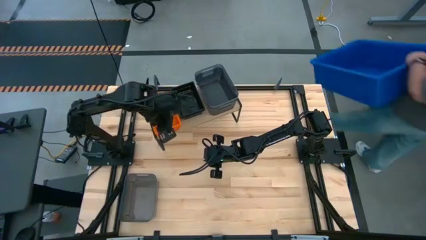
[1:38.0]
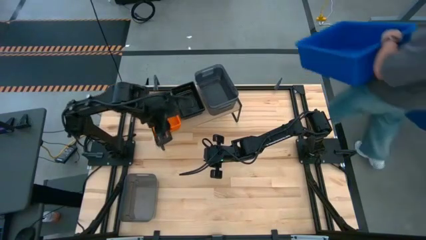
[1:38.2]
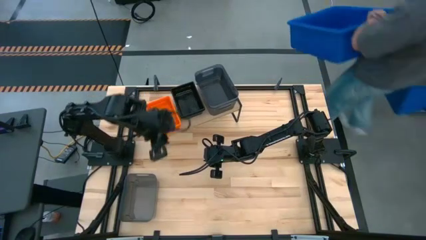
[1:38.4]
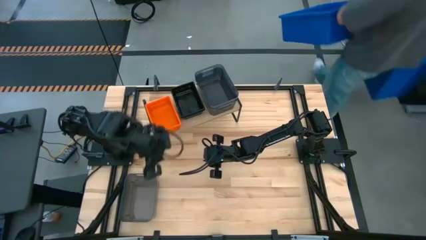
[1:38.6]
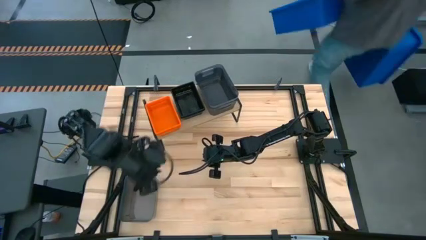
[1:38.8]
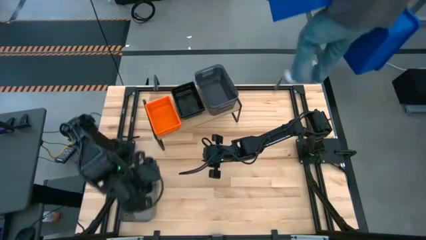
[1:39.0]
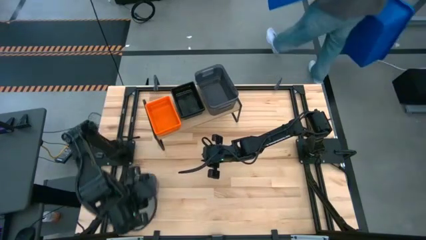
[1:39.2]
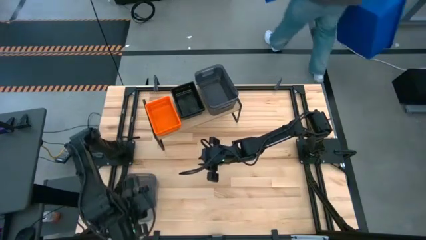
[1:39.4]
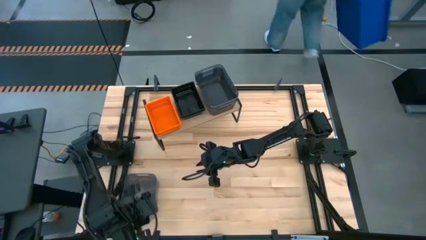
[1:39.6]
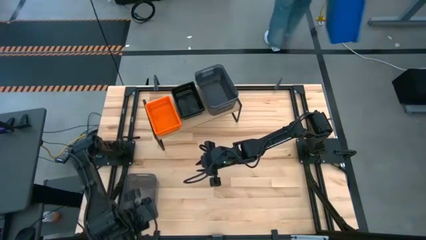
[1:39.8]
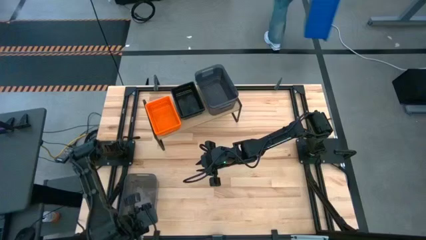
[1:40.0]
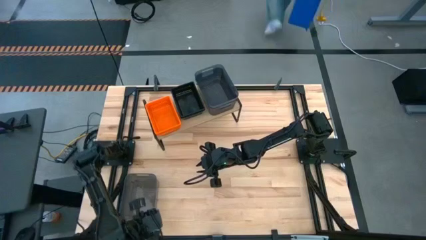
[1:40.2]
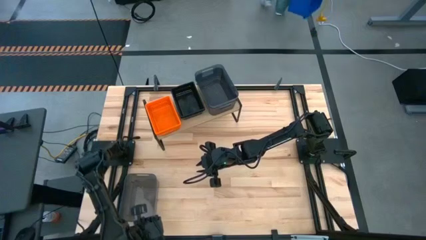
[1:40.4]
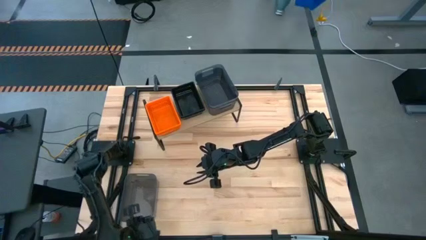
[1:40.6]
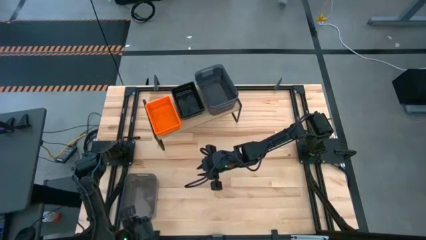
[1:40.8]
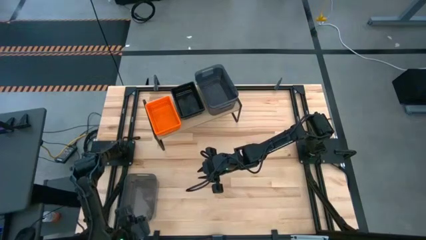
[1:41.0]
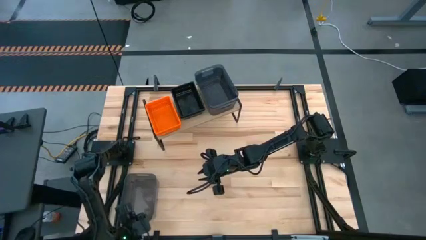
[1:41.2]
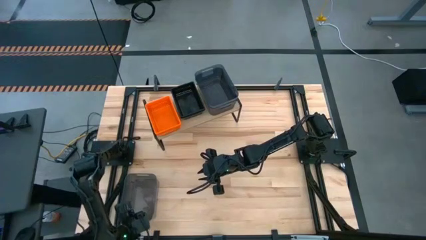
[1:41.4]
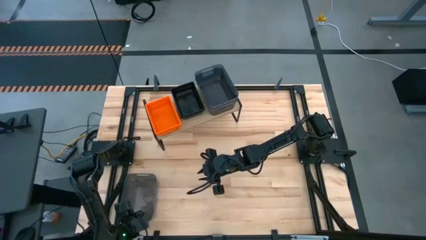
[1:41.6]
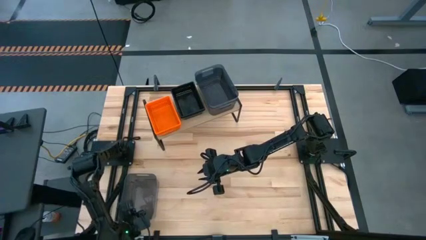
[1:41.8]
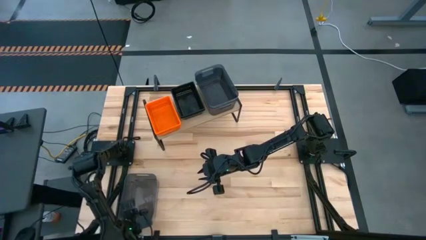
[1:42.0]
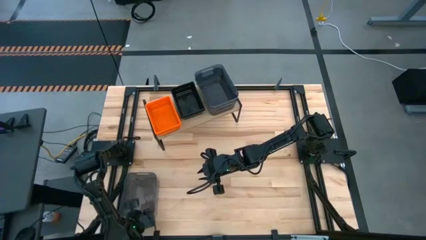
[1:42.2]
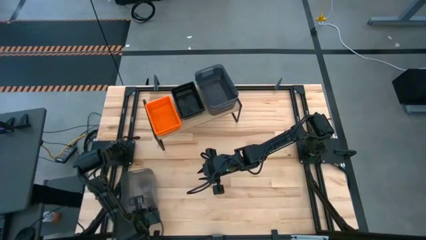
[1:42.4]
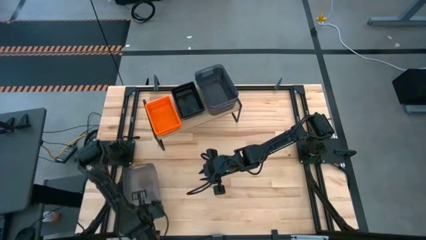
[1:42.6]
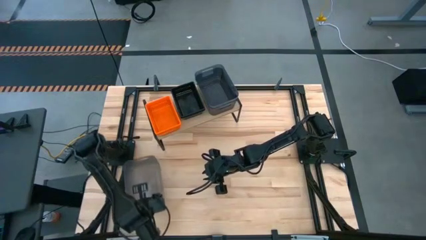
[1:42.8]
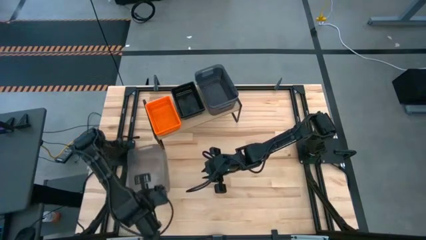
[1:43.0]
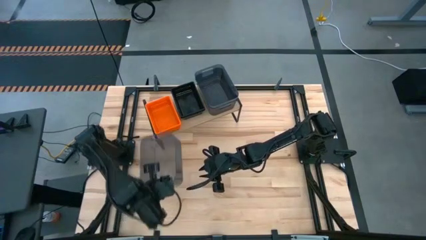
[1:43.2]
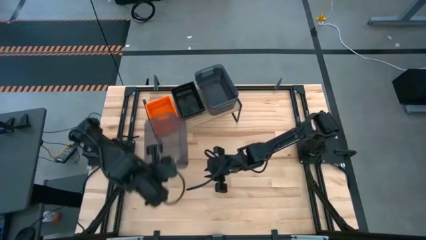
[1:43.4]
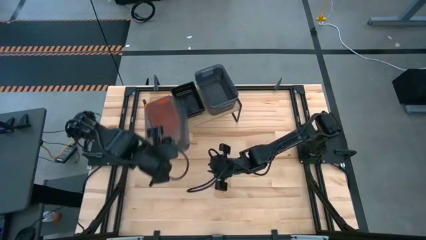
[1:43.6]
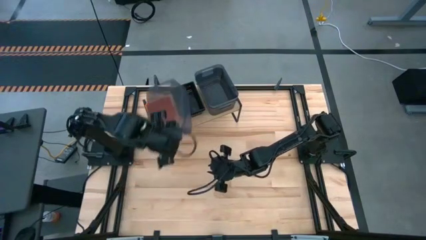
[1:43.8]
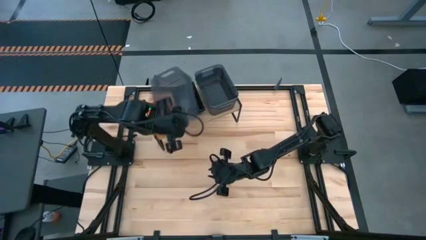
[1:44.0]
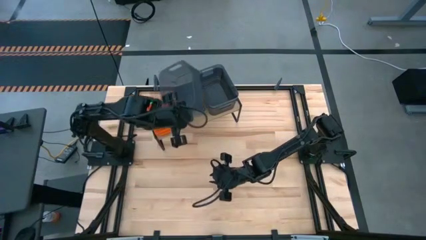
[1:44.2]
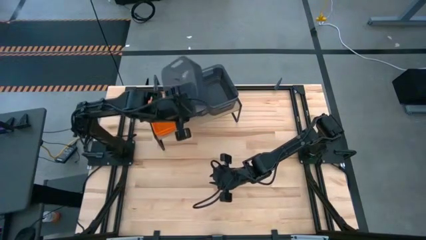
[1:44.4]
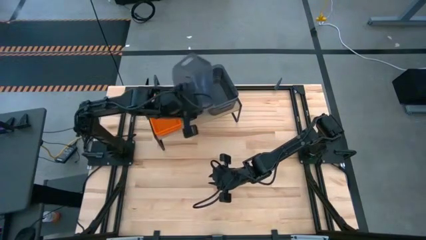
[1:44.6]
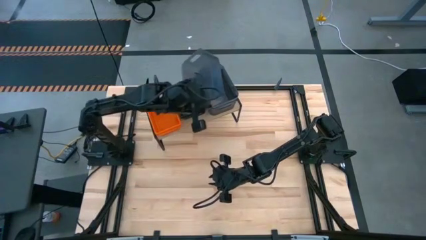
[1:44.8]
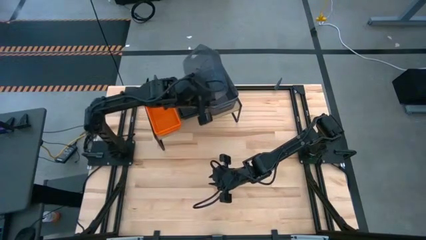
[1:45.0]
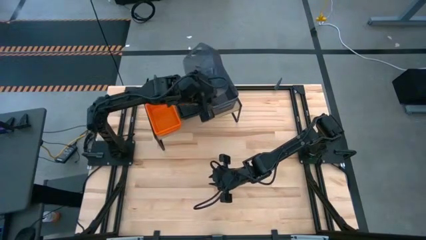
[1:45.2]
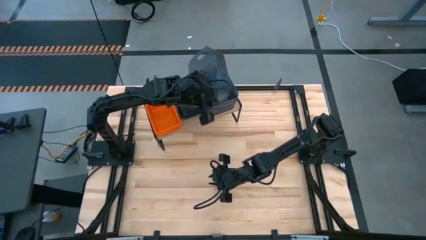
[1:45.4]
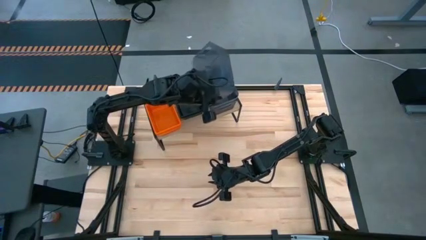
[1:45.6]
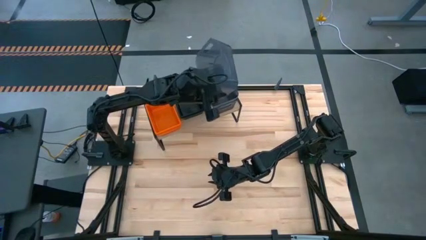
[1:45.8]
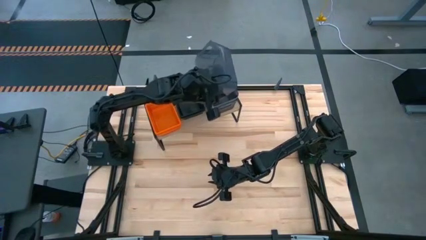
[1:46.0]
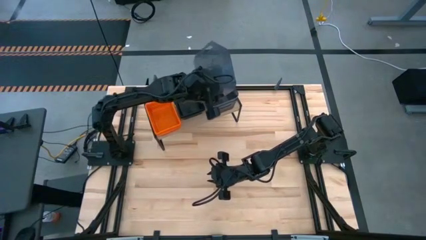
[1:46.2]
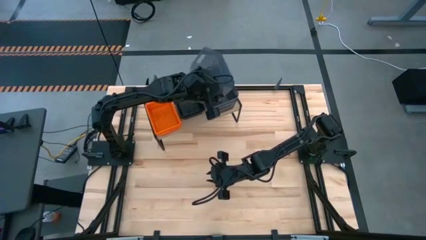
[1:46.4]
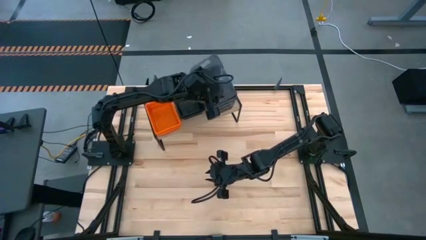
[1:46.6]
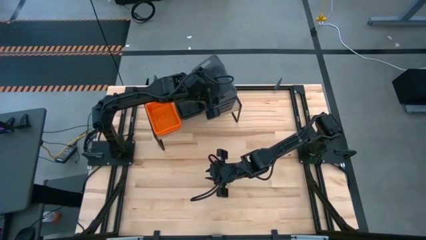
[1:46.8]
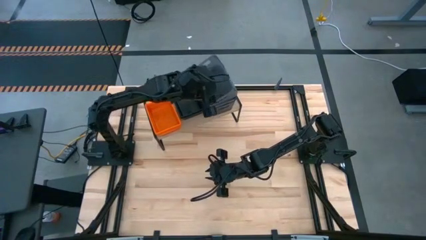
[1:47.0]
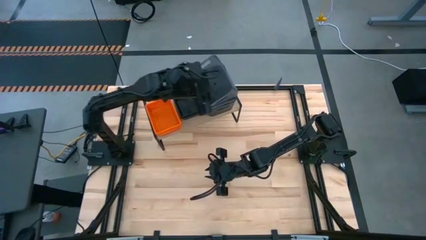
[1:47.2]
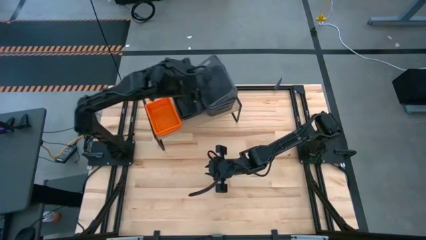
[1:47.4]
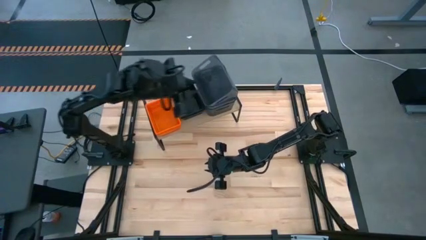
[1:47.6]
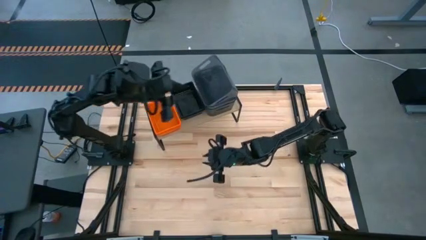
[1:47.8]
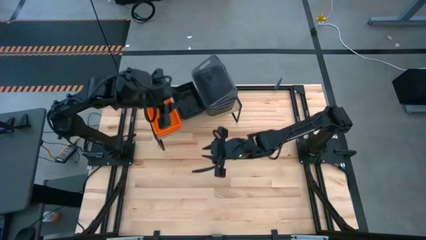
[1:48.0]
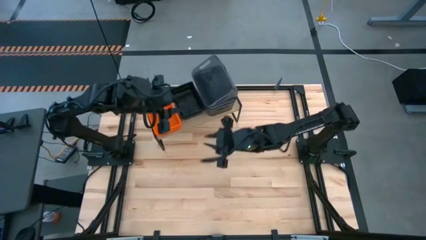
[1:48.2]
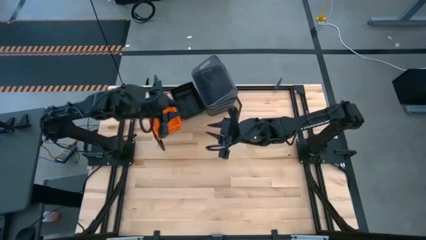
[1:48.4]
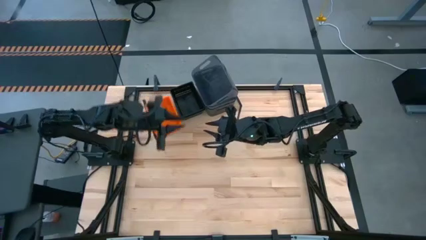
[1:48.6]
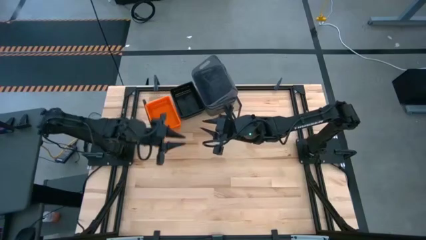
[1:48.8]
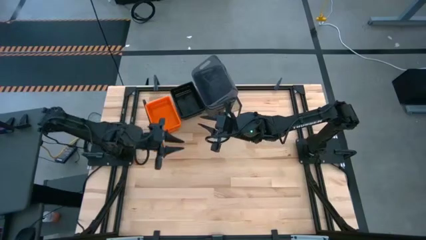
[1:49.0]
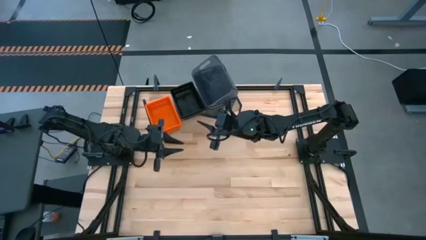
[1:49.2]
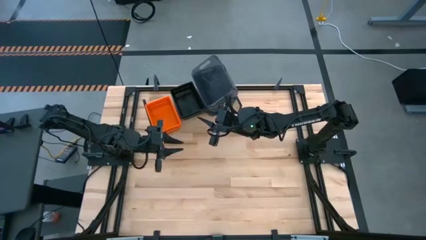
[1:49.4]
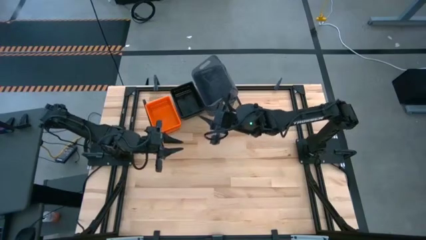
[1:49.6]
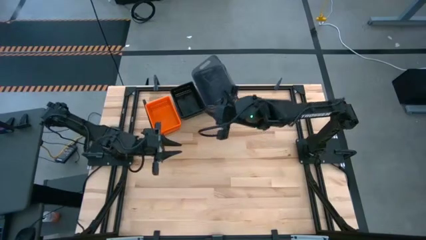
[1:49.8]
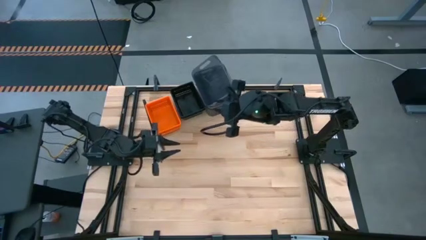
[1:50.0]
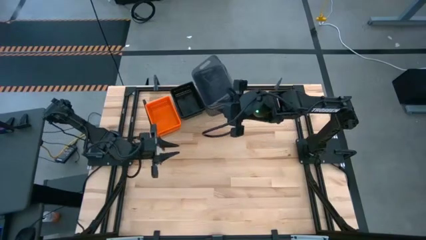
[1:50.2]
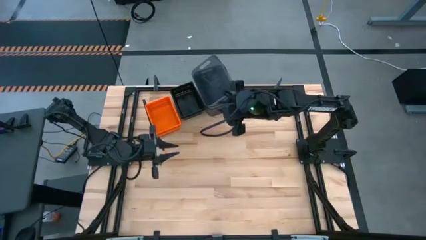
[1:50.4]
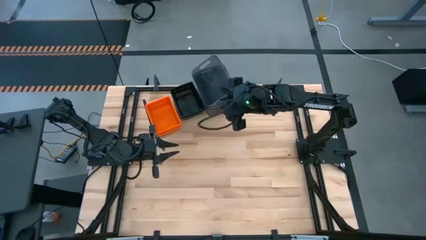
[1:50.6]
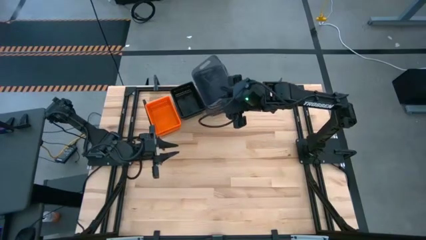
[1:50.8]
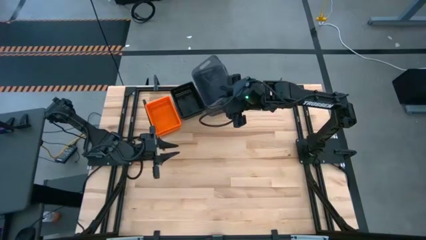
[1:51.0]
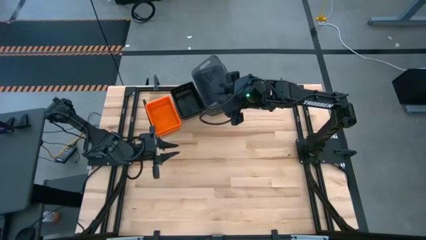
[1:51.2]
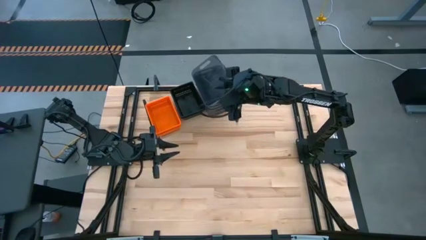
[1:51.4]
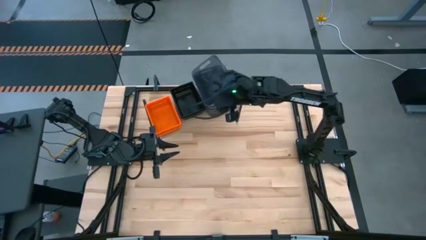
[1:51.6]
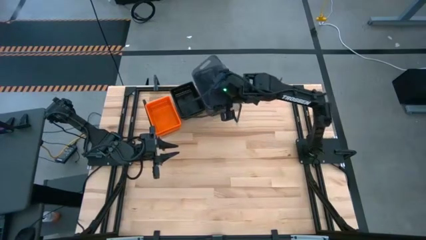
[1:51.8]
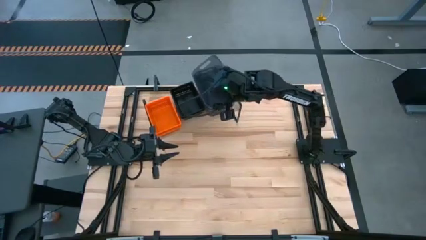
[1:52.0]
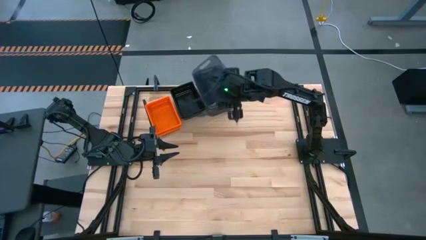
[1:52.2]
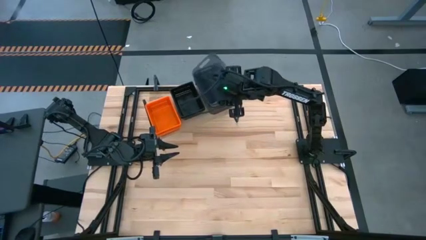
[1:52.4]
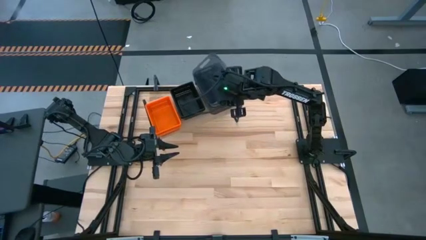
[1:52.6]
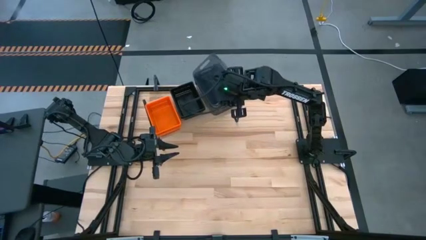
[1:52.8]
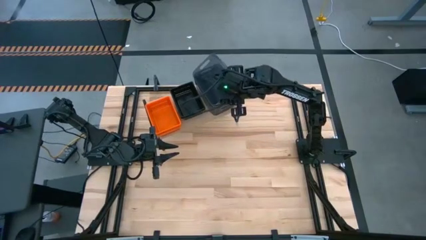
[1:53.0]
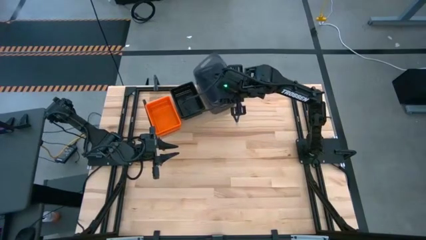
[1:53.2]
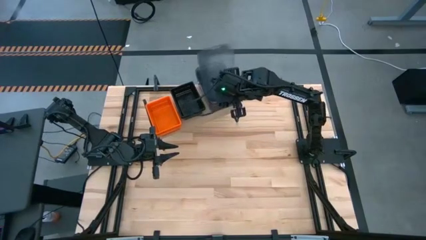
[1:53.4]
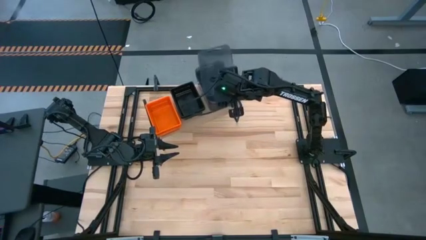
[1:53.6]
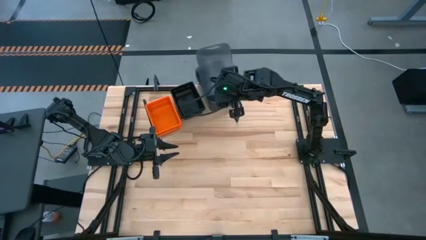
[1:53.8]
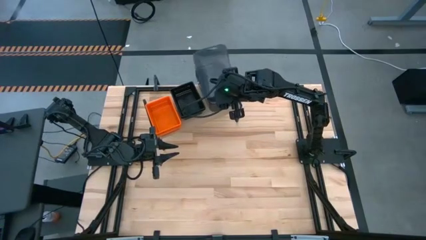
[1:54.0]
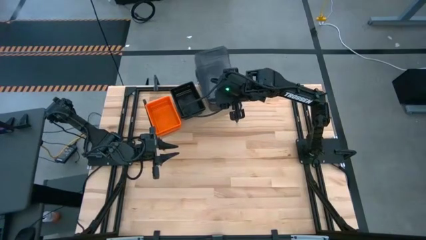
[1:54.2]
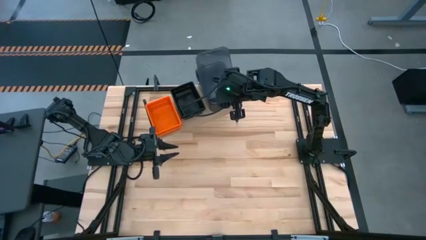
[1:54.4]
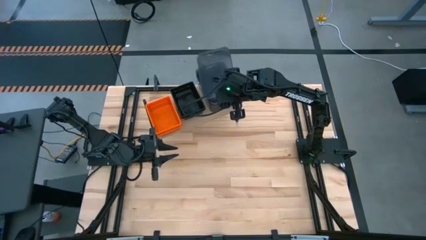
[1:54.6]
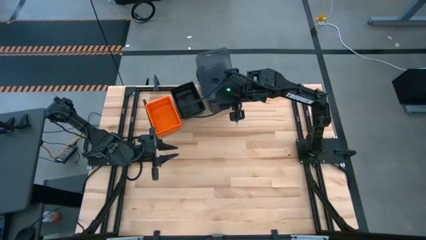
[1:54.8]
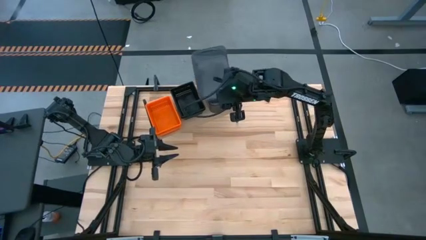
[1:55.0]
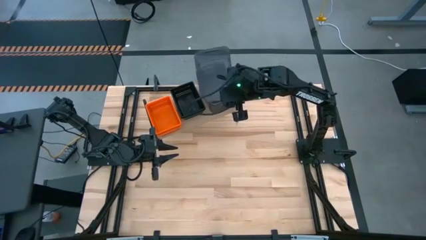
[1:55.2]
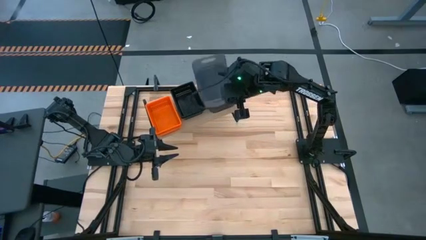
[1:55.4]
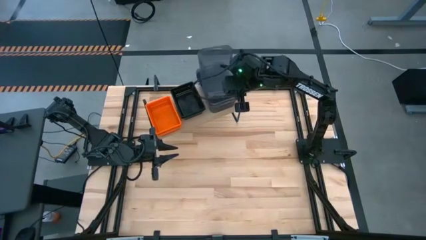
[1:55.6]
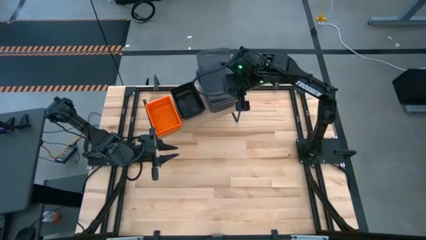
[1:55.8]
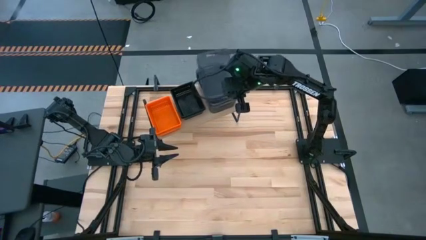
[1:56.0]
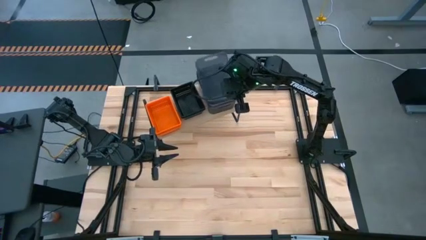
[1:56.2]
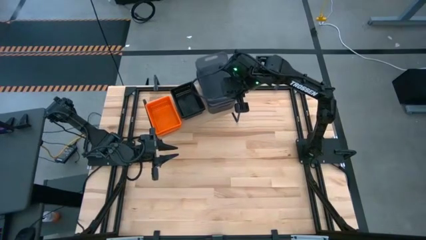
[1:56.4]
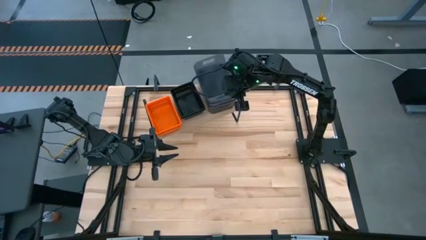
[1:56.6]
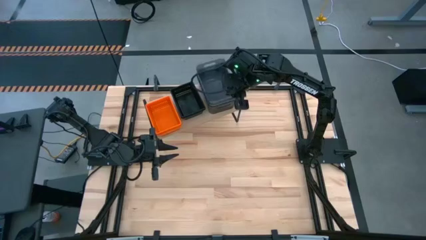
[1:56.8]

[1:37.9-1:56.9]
Task: Stack baskets on shelf by color
Stack the gray bin on top of the gray bin on the shelf
